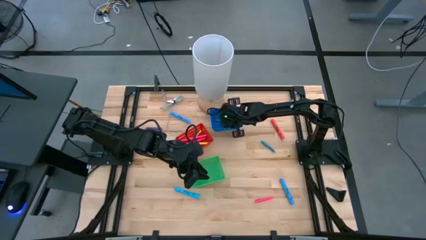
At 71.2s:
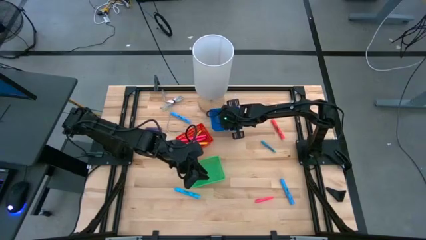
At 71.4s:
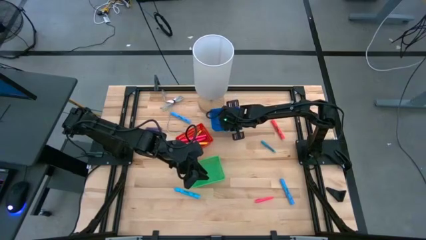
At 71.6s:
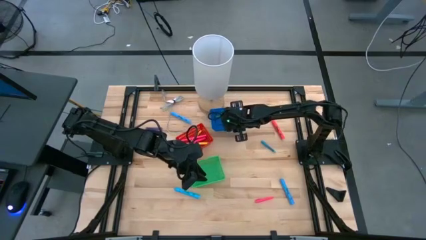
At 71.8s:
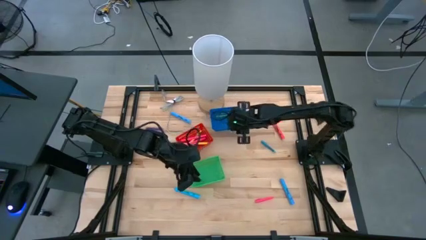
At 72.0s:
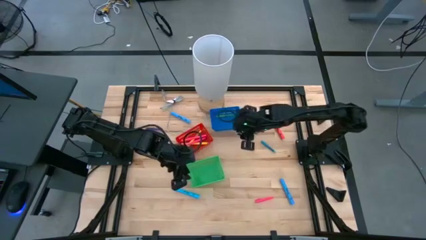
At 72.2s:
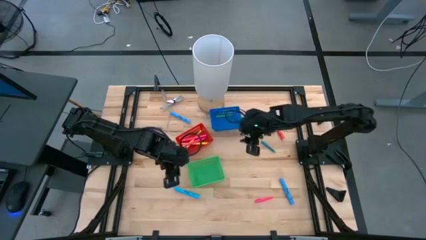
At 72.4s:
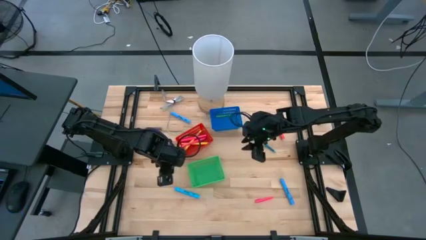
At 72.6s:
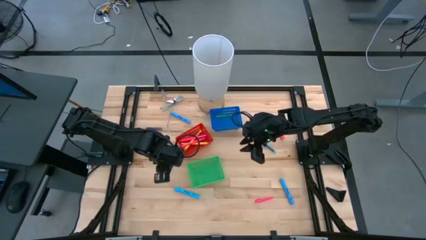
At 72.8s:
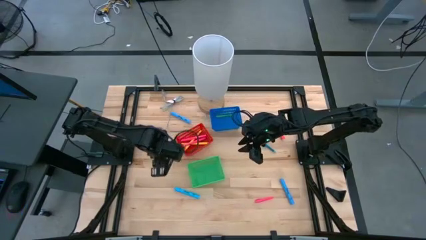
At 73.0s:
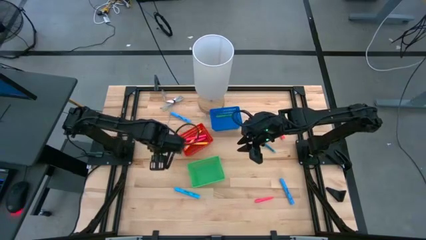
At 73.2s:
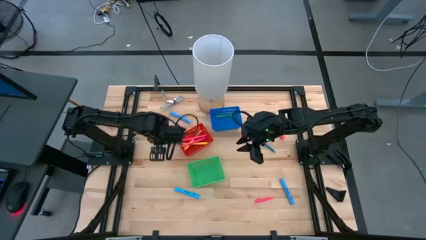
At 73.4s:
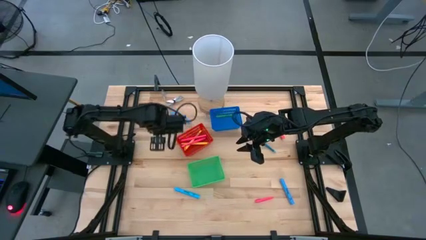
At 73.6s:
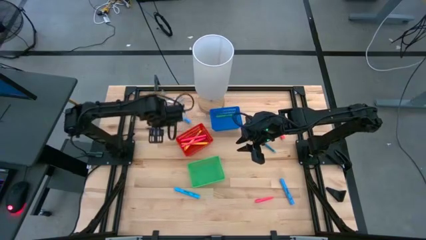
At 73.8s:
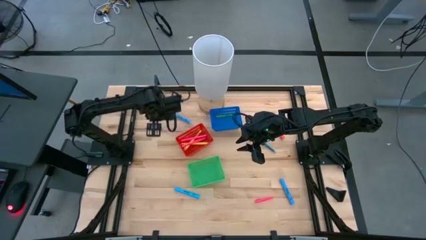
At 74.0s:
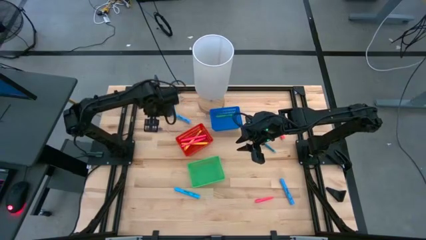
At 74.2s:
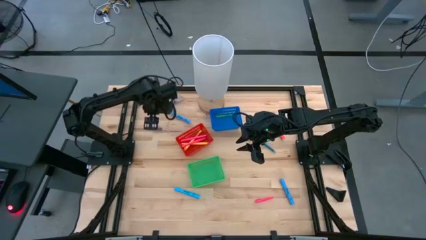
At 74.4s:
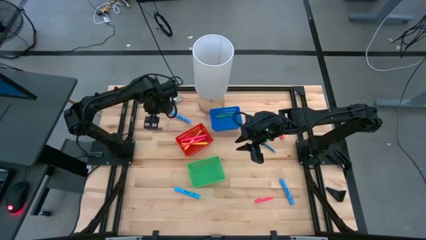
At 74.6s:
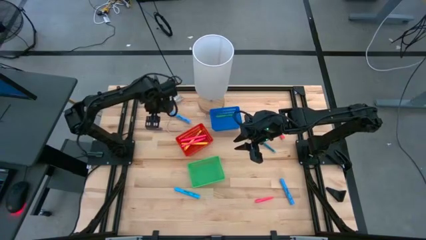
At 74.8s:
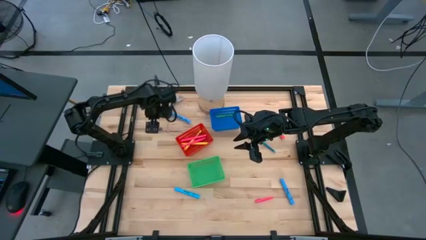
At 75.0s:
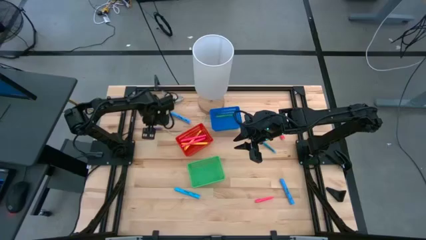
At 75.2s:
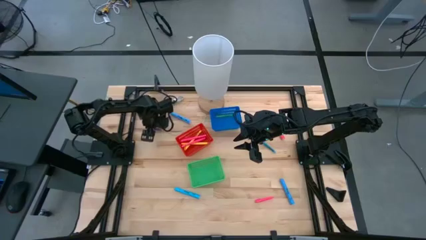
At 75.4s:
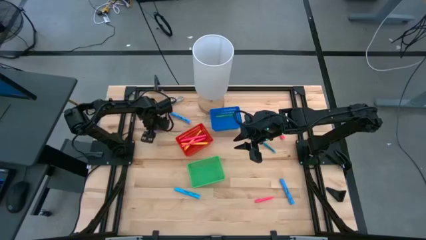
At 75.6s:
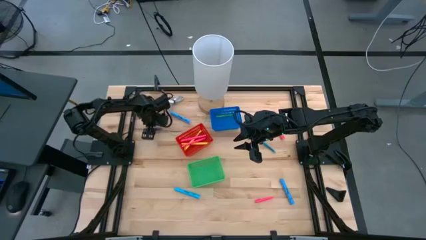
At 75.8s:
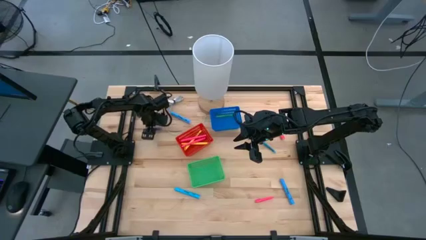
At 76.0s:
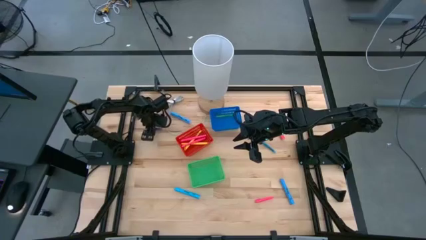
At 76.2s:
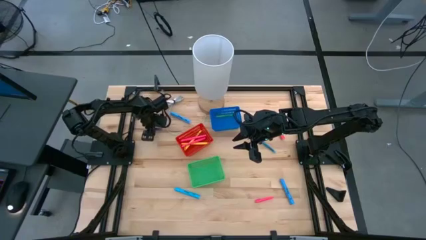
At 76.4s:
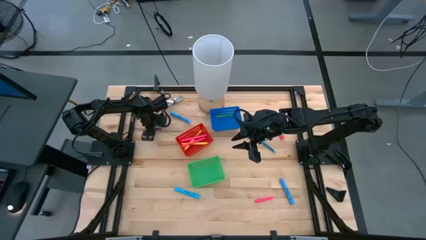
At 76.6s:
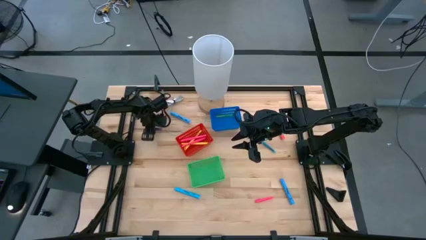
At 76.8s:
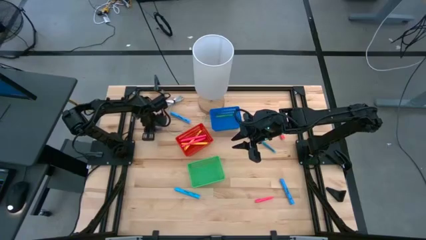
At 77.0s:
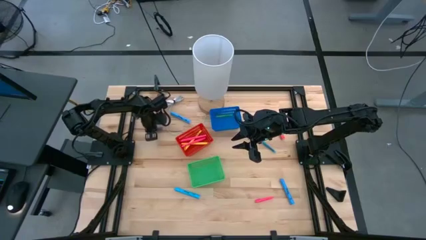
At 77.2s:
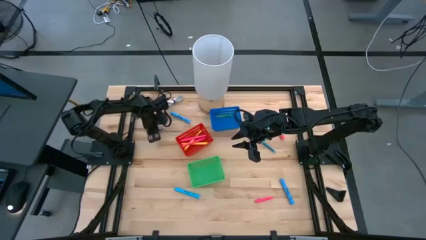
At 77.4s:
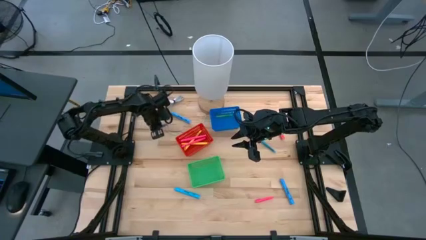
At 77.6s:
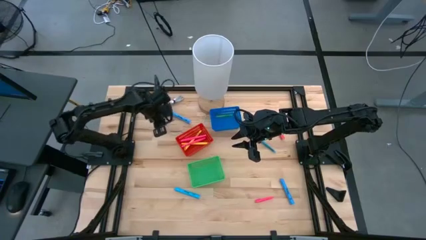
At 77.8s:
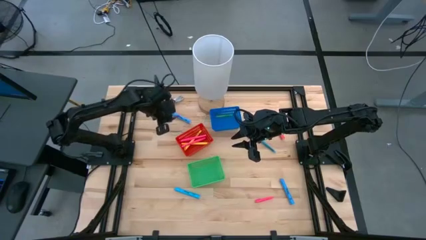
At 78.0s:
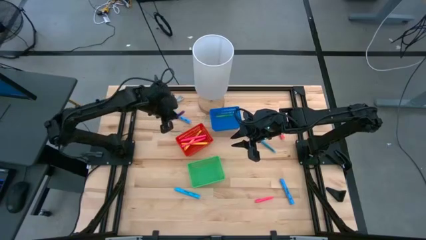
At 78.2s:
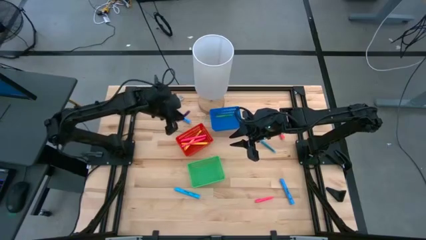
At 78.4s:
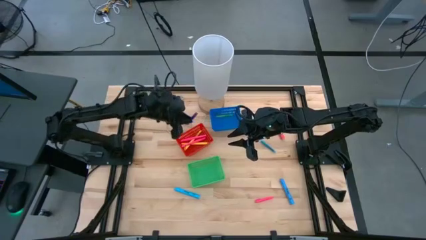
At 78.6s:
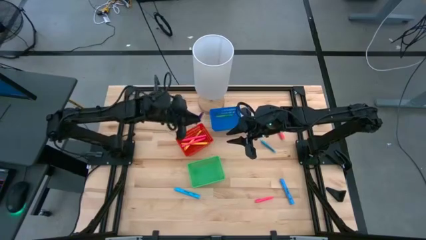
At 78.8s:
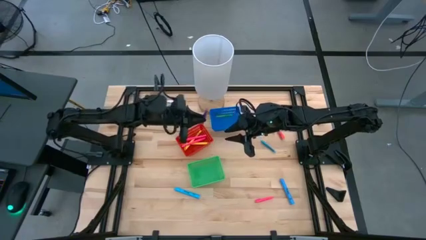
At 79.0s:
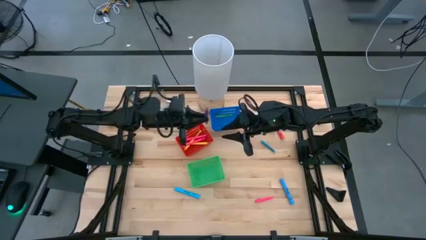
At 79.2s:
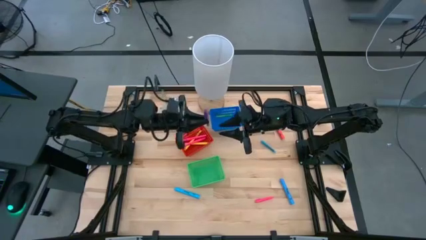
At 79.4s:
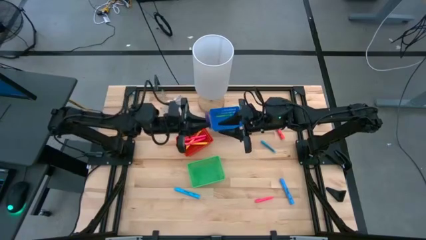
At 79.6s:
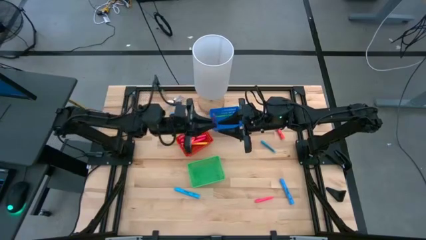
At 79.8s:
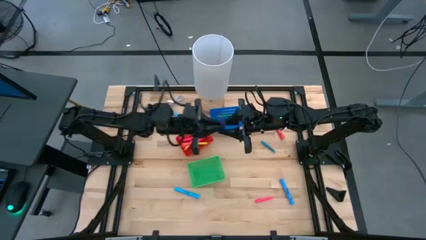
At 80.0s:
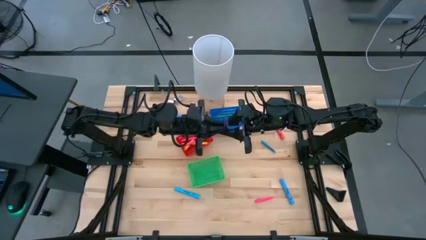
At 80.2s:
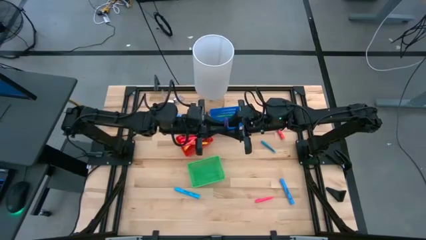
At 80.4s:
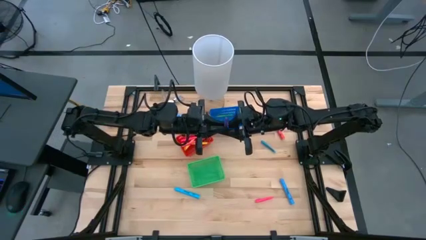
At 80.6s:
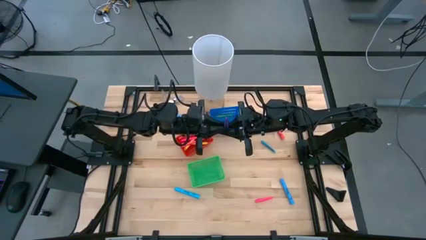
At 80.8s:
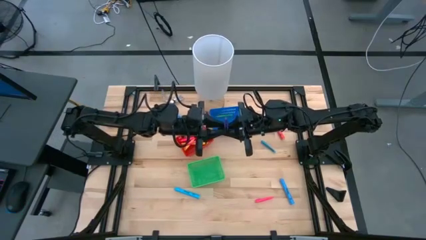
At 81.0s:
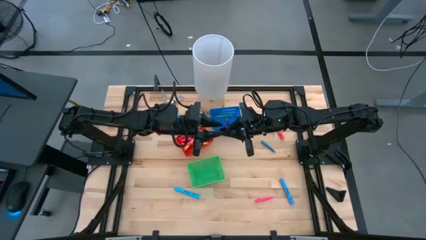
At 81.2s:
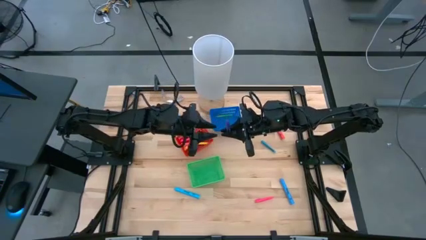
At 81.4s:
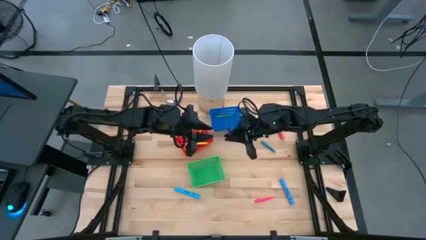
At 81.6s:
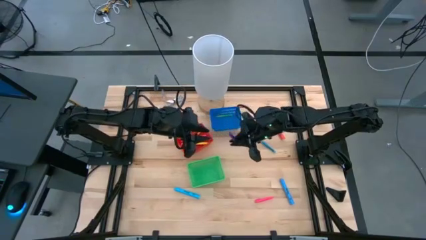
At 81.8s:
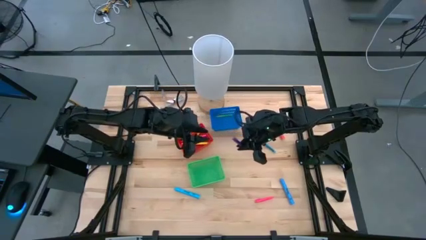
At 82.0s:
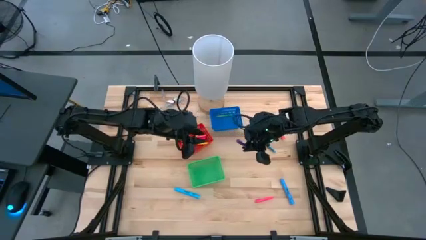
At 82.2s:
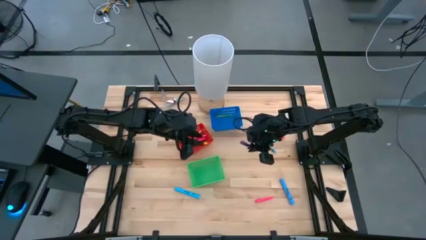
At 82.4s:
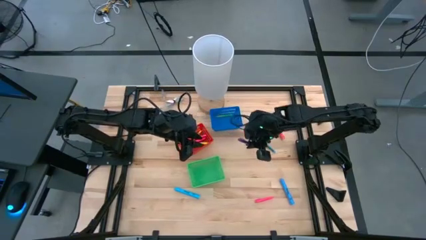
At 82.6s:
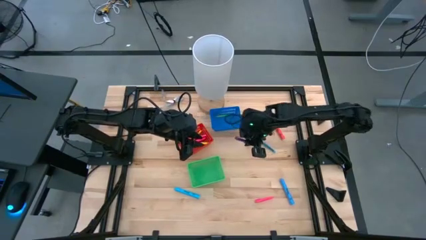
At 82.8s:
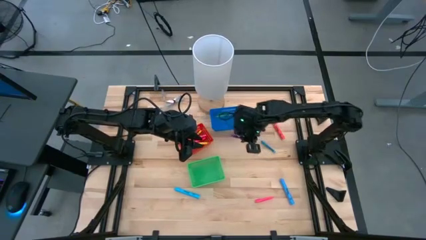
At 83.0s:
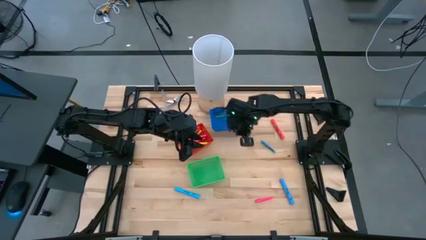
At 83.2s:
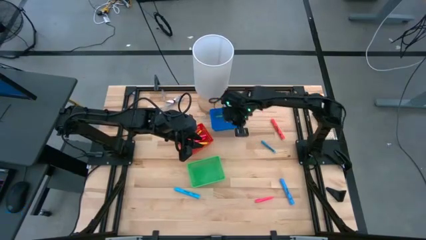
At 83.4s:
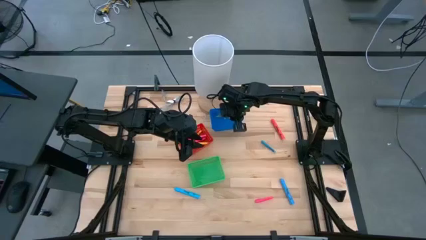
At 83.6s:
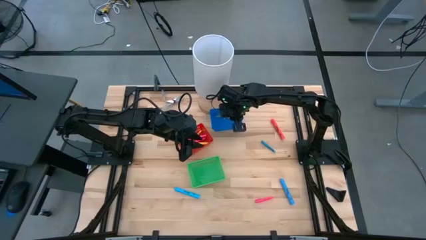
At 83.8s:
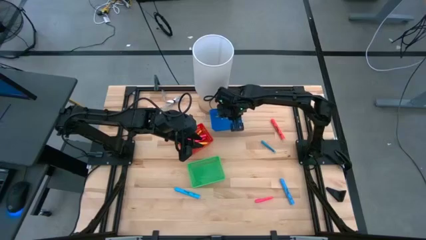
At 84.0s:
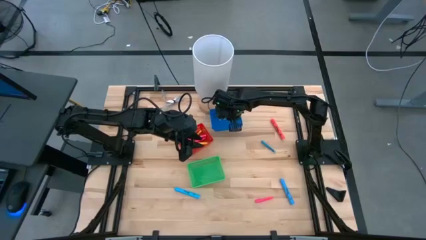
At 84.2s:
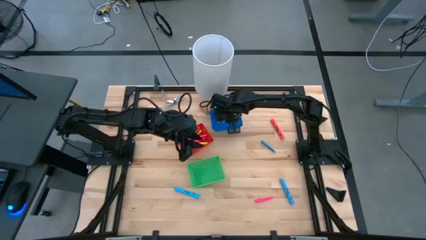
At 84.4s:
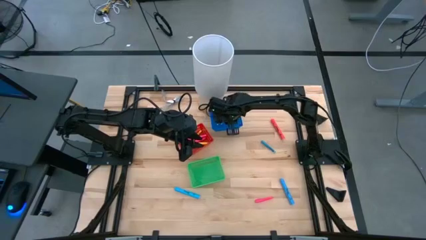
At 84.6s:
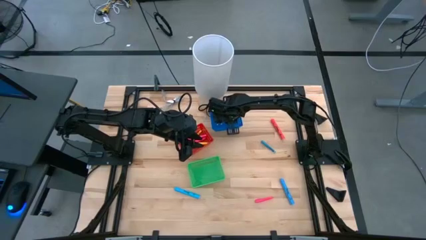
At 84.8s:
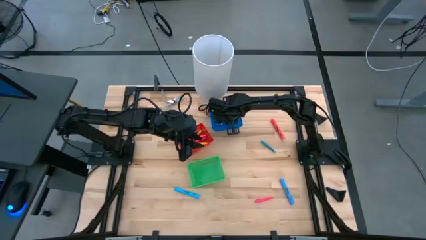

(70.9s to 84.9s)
Task: Pick & Place Markers
Put the purple pen into the blue bin

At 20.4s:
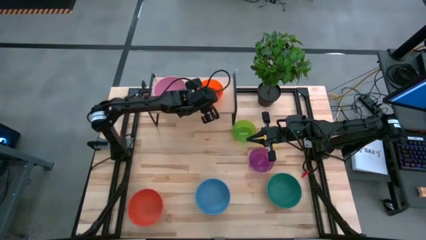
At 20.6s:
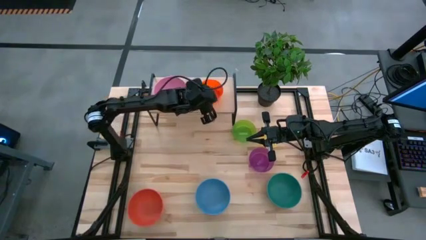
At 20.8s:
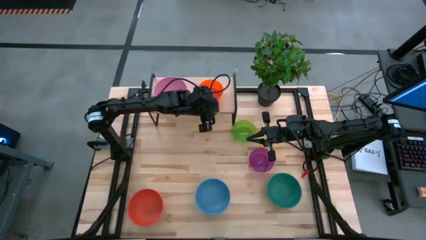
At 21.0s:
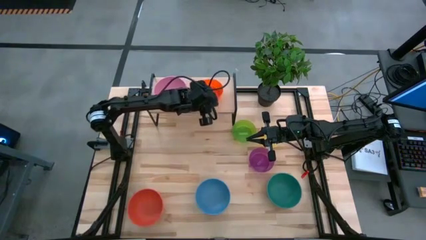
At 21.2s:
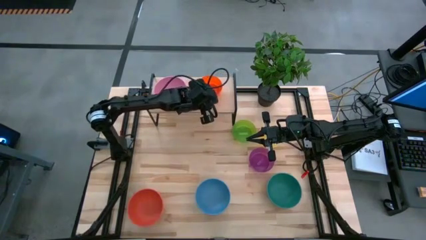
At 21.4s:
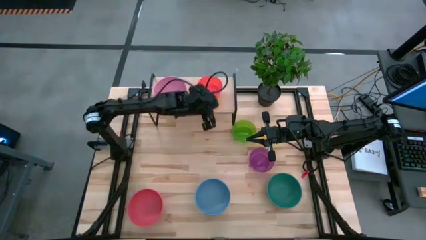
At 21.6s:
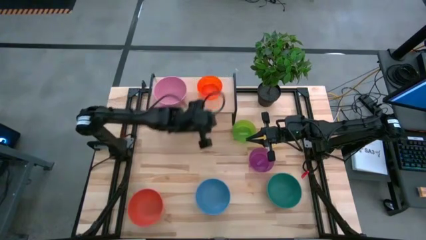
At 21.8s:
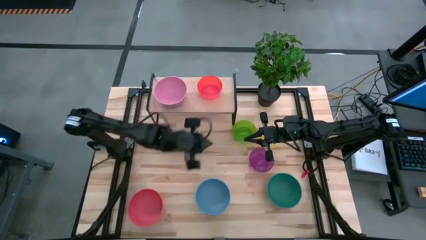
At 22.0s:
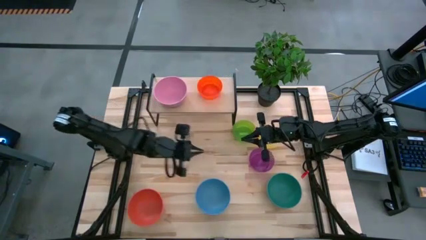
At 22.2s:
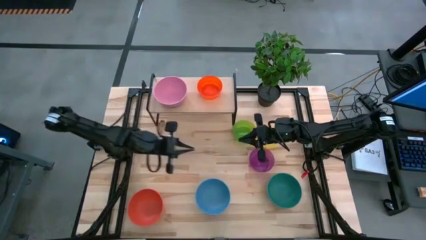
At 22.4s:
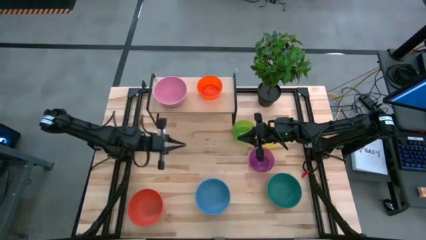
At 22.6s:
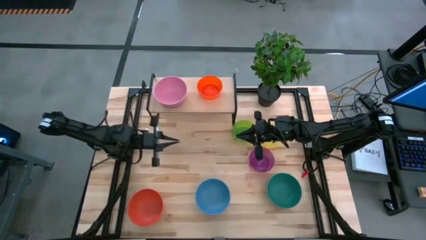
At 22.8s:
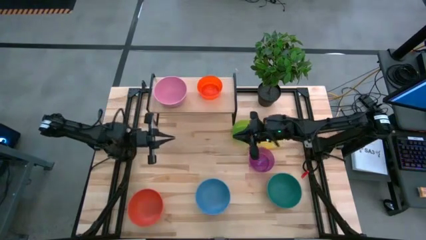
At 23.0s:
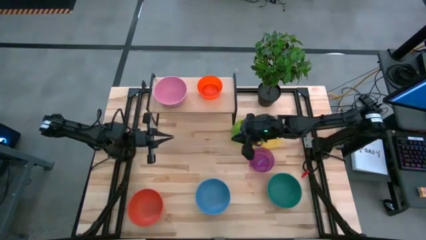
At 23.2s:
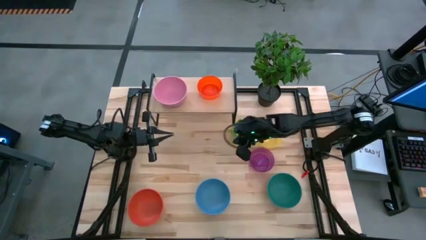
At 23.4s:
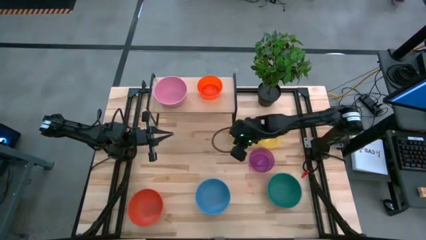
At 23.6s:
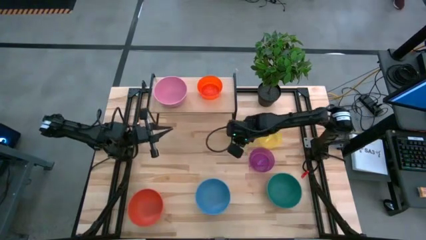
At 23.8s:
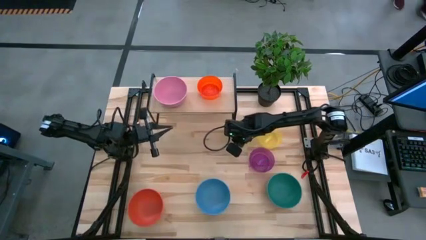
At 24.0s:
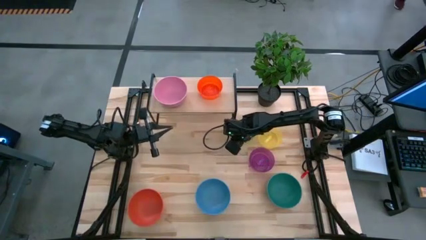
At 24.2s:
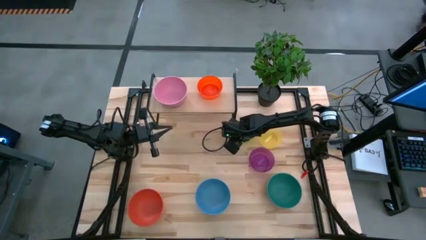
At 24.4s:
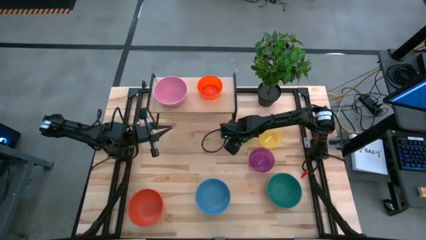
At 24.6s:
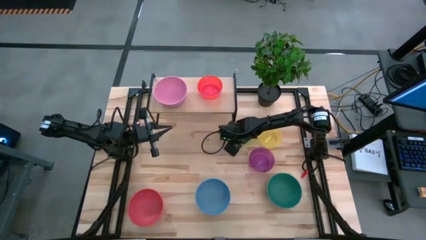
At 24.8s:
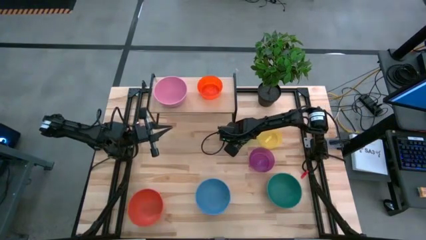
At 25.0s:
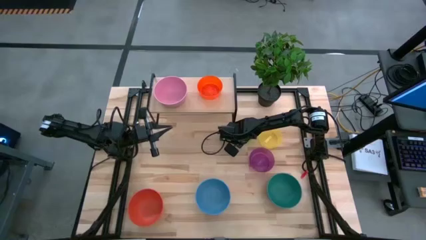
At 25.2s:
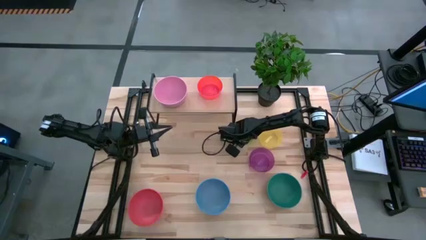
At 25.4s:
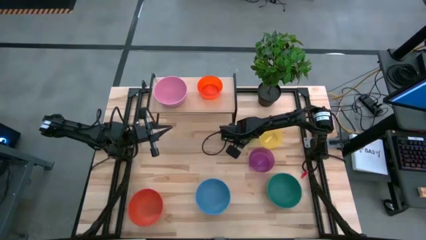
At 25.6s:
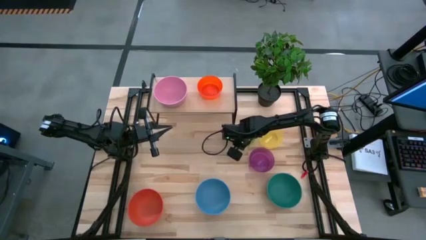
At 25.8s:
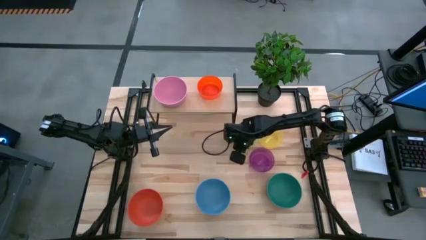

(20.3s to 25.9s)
Task: Place and stack bowls onto a shelf
Stack the small green bowl on top of the small orange bowl on the shelf
